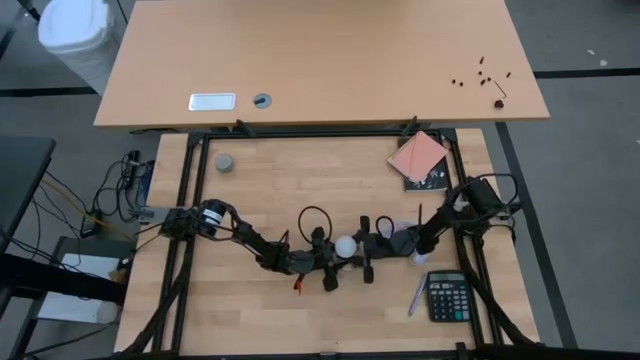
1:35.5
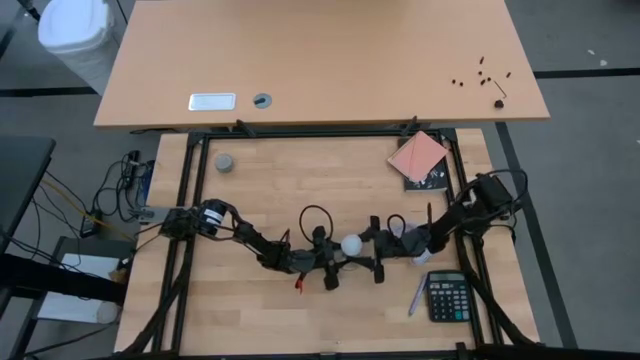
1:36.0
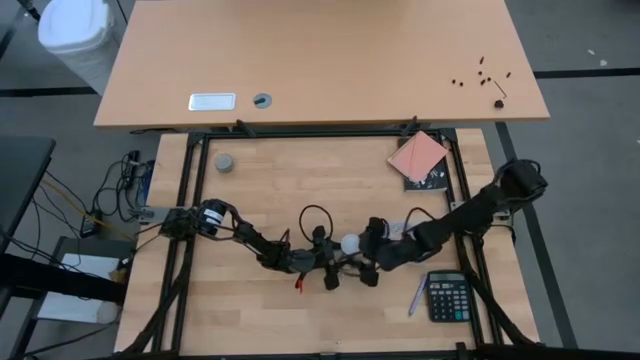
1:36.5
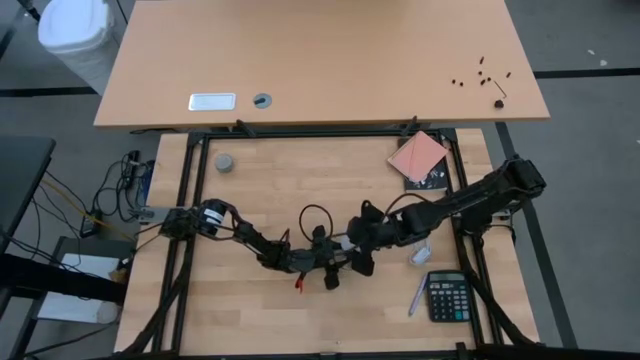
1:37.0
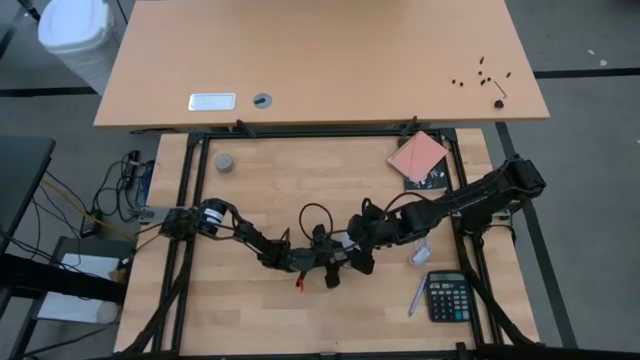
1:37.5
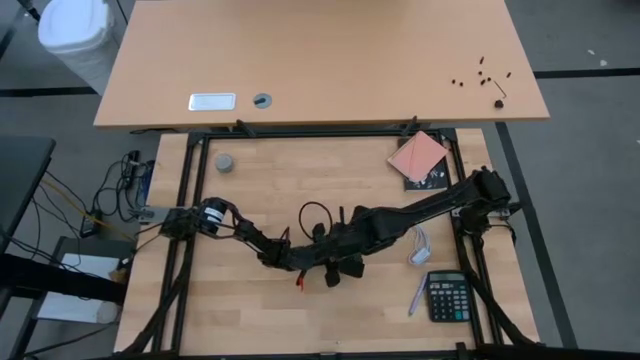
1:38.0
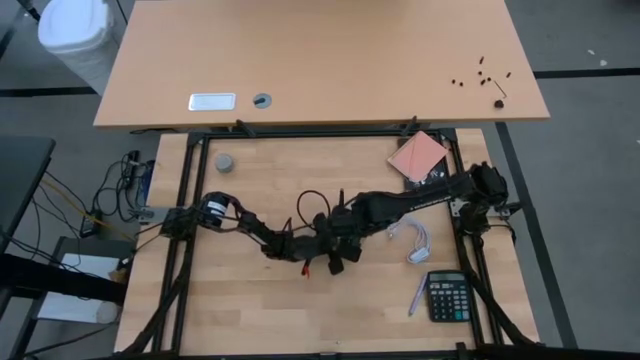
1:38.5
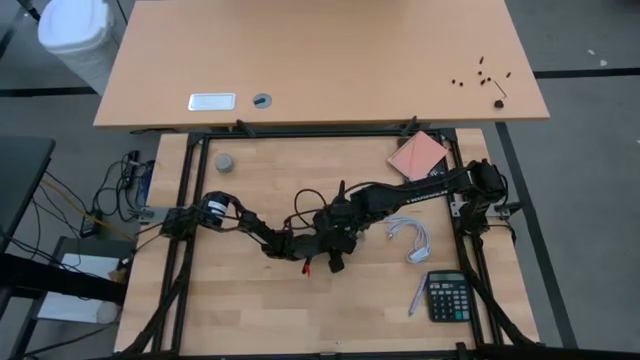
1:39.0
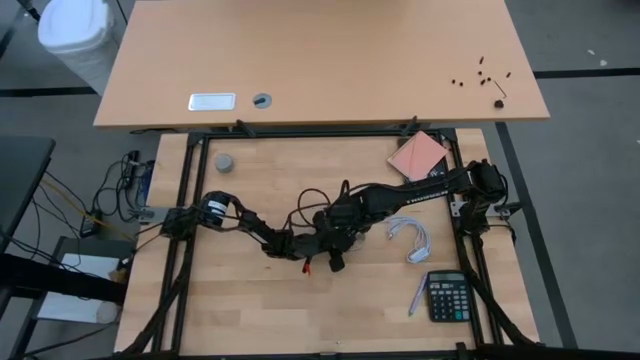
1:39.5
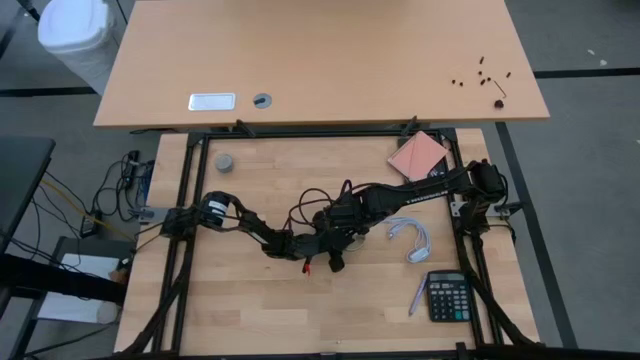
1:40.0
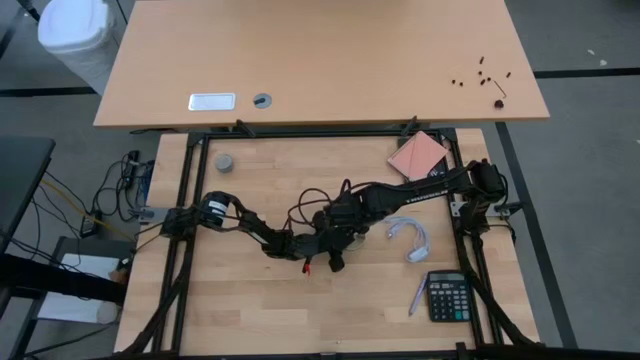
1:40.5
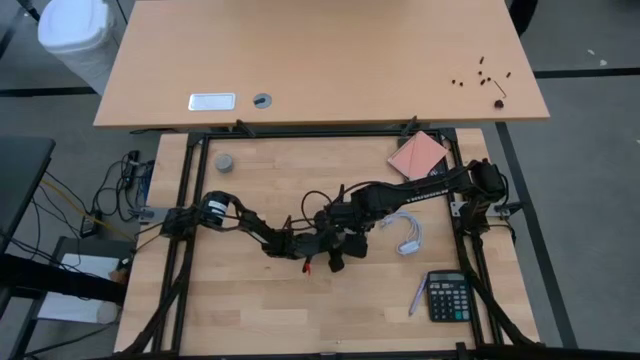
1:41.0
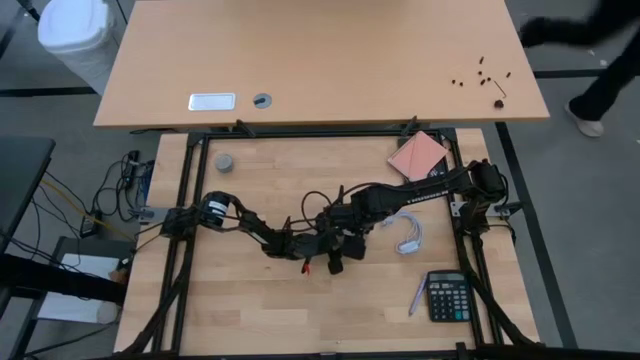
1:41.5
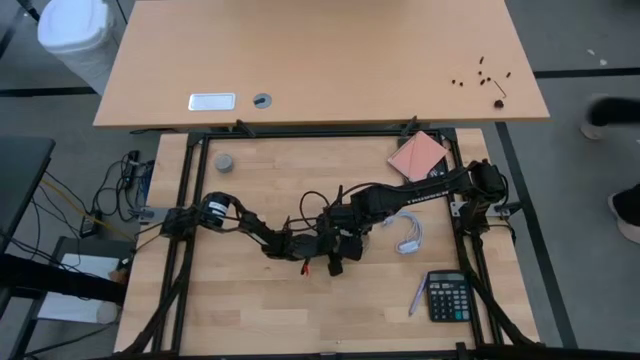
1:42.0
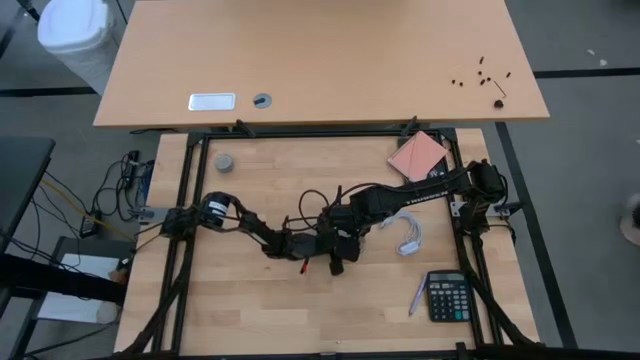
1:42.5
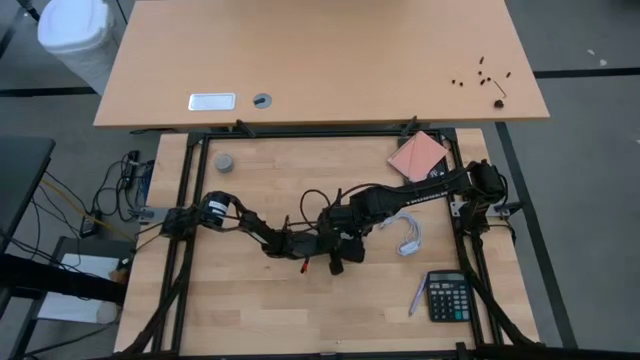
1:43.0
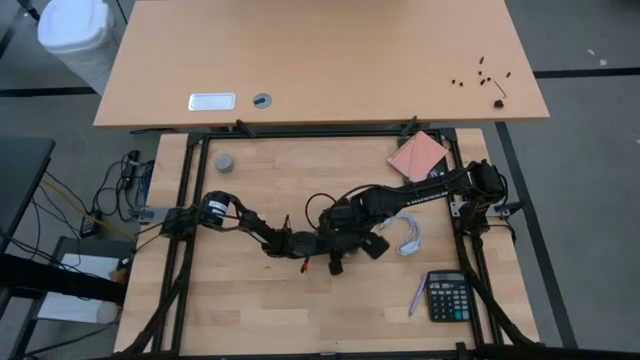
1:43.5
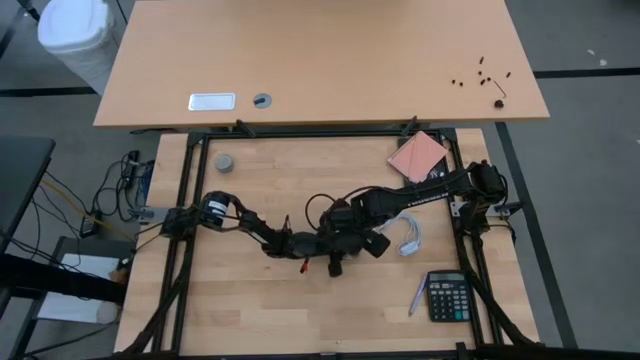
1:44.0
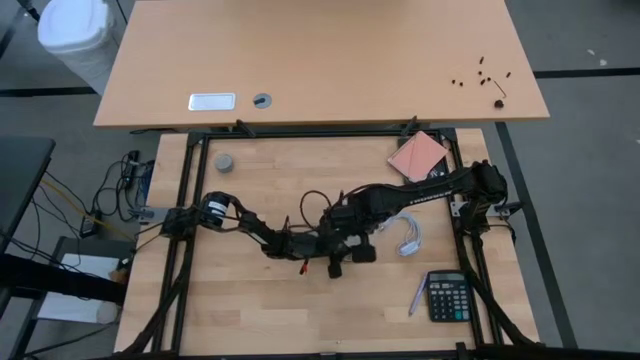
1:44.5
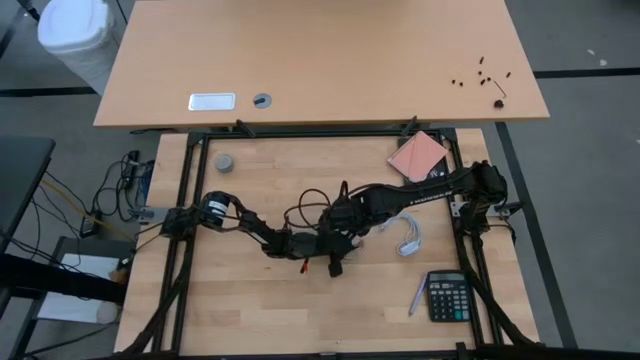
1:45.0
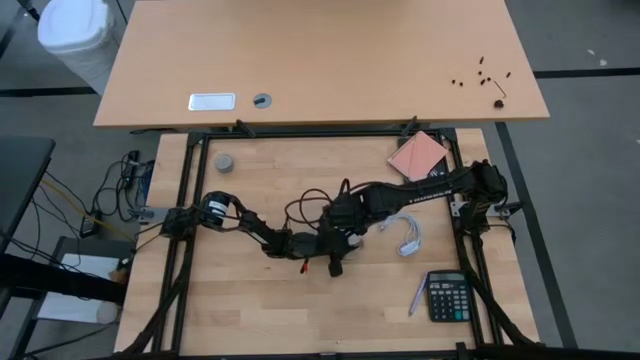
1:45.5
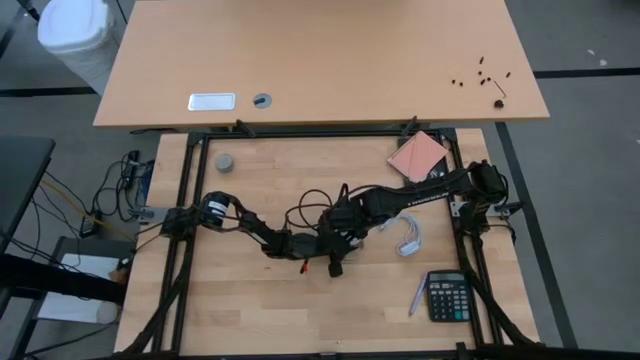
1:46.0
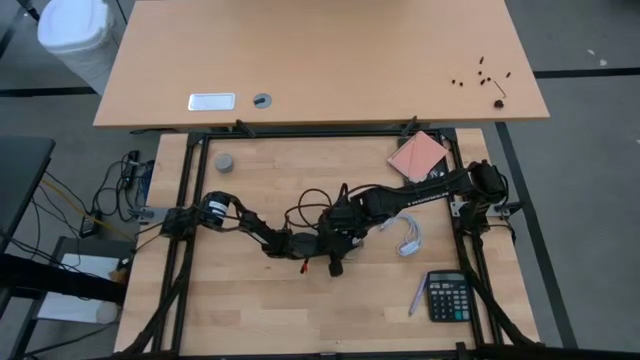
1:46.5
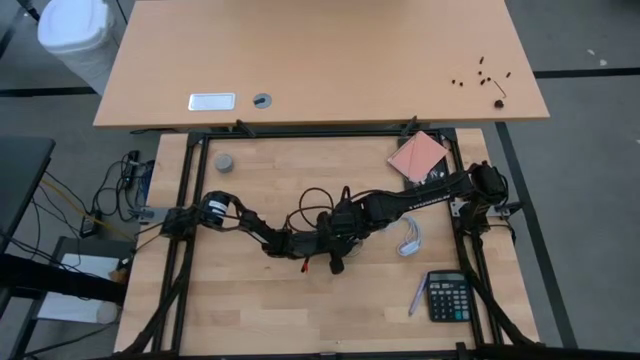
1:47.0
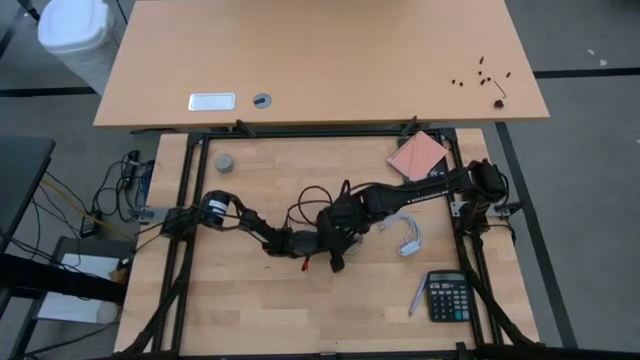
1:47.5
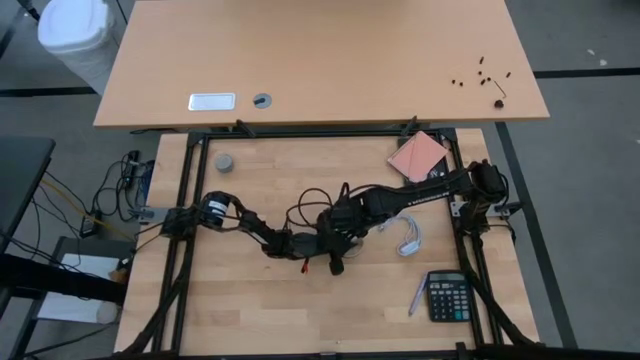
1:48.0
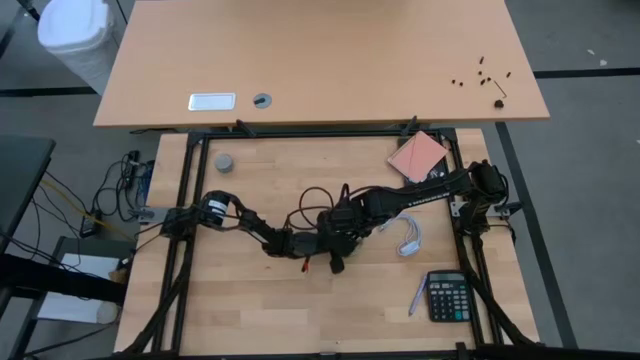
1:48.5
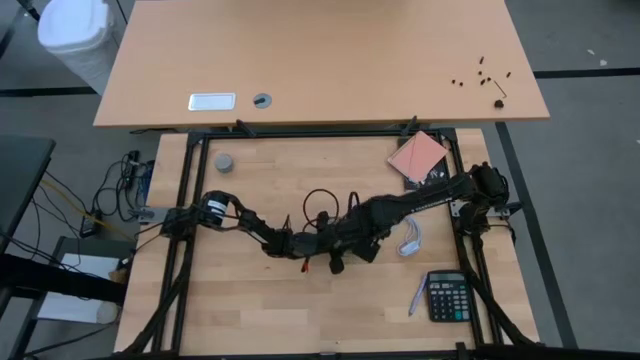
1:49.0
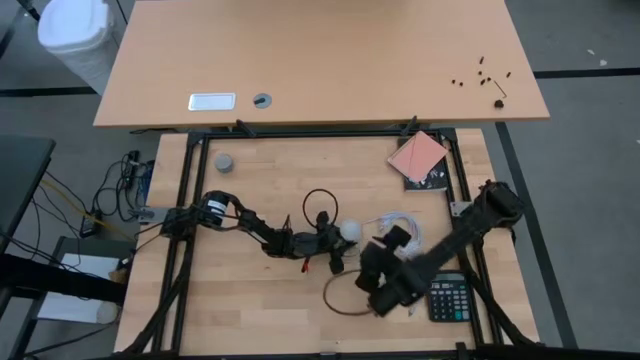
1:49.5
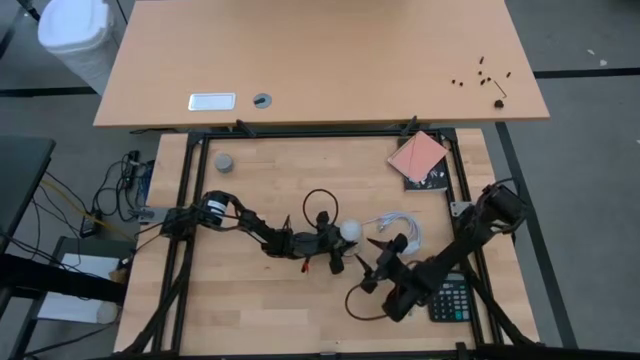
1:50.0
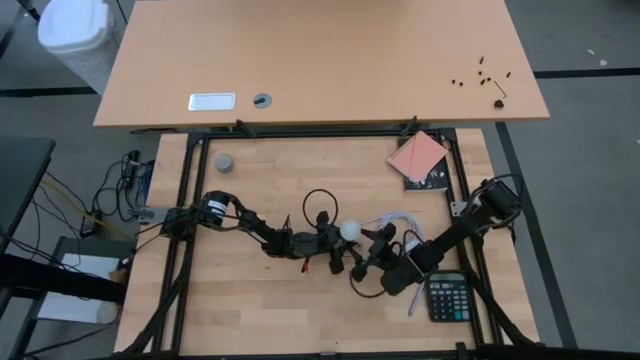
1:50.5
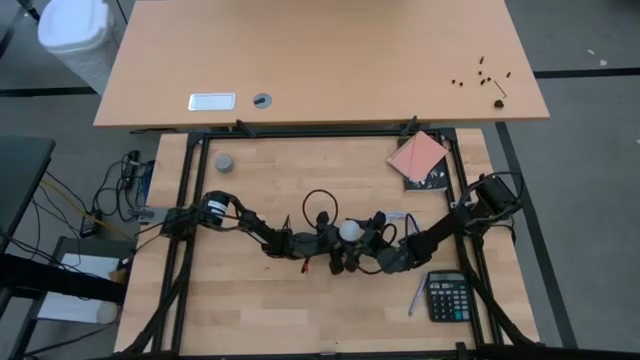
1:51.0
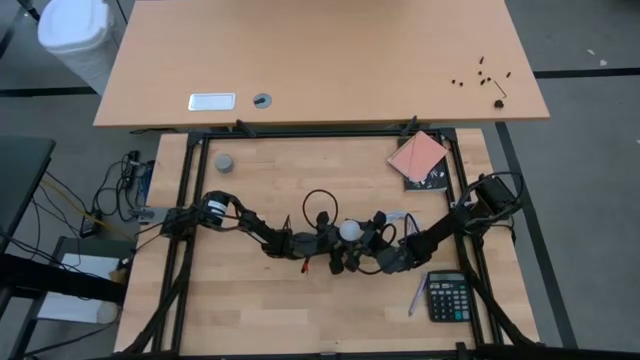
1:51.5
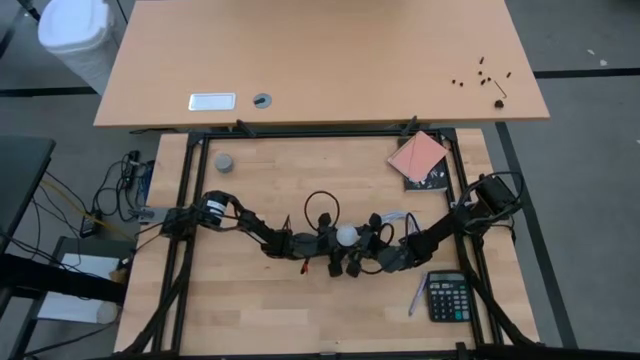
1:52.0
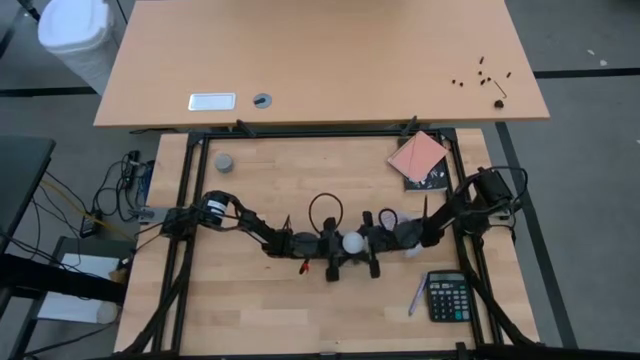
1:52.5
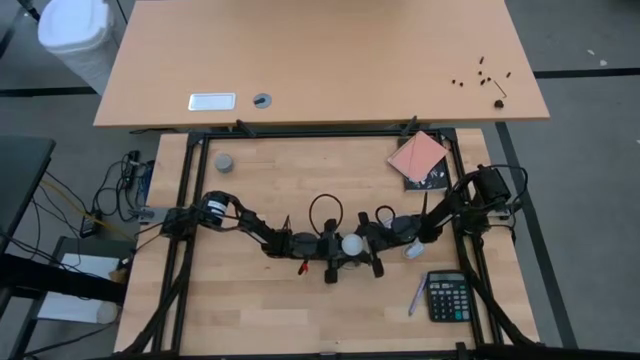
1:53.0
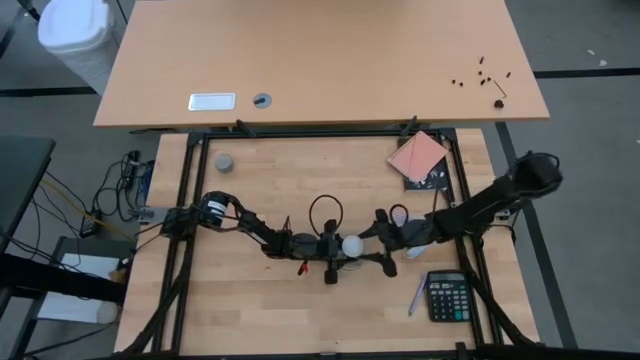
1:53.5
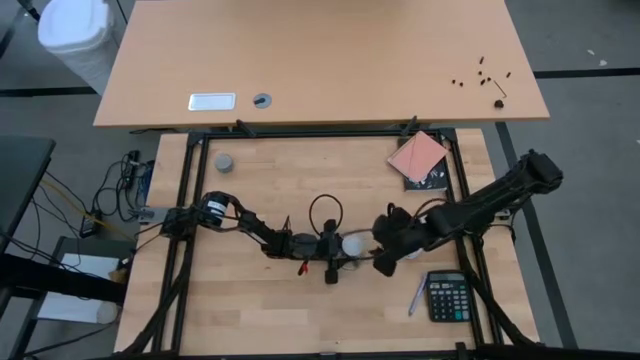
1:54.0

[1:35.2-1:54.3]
Task: Screw lightbulb
Remove the white lightbulb from the golden lamp
